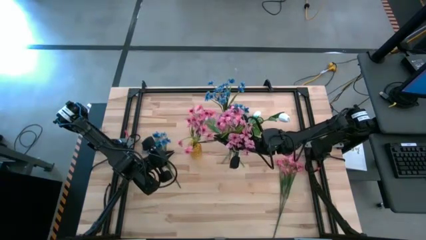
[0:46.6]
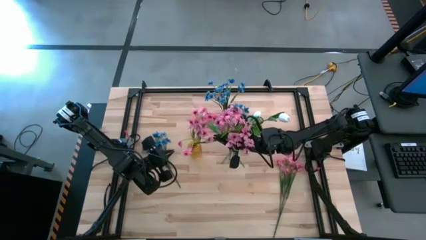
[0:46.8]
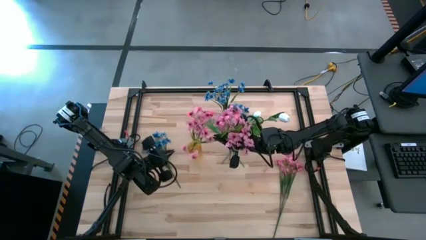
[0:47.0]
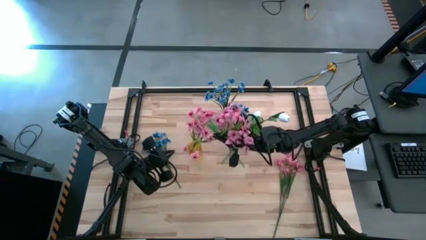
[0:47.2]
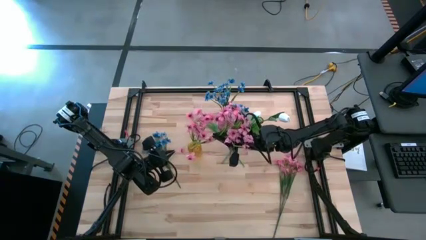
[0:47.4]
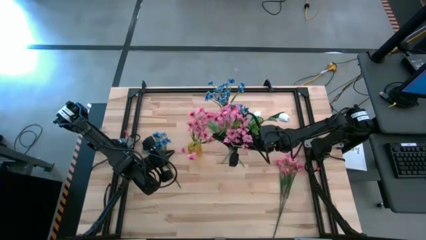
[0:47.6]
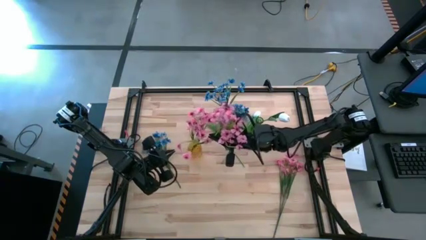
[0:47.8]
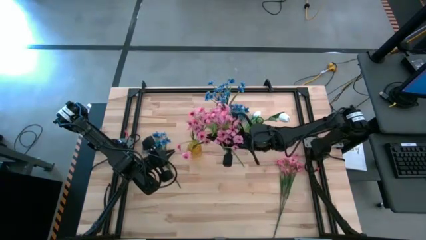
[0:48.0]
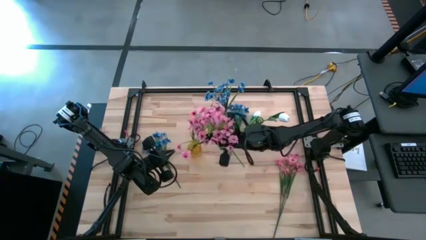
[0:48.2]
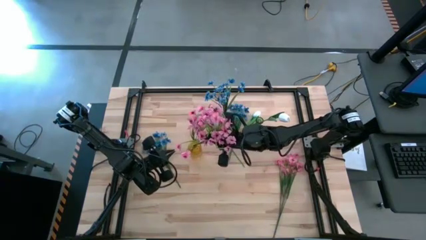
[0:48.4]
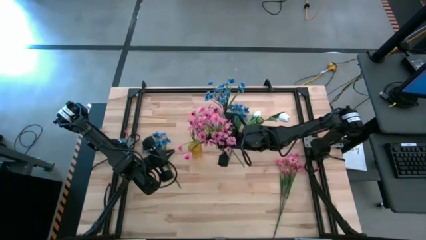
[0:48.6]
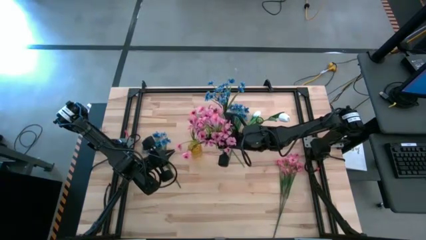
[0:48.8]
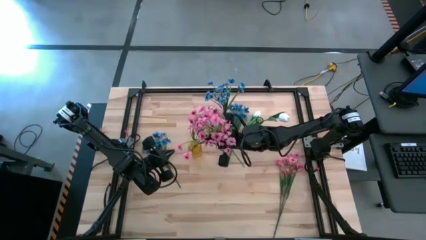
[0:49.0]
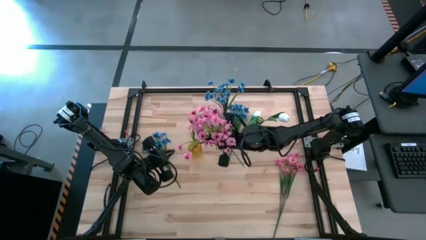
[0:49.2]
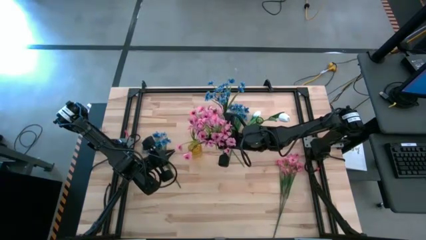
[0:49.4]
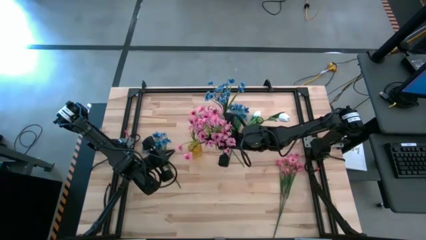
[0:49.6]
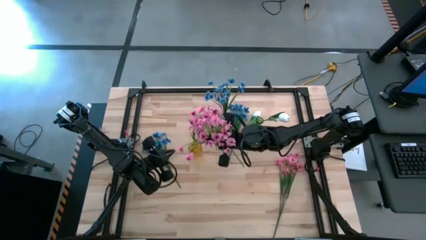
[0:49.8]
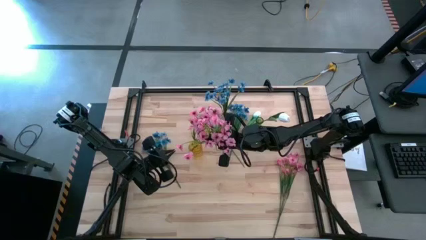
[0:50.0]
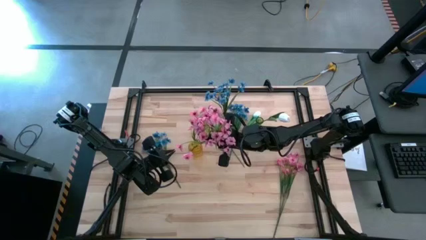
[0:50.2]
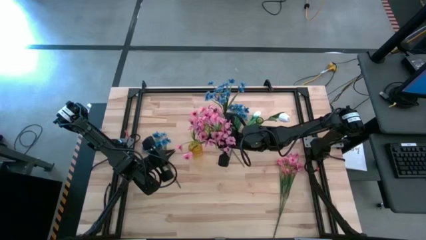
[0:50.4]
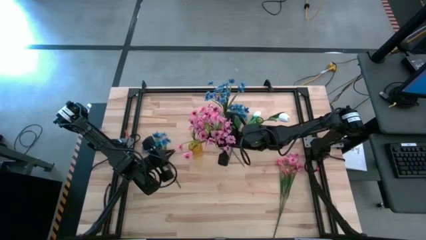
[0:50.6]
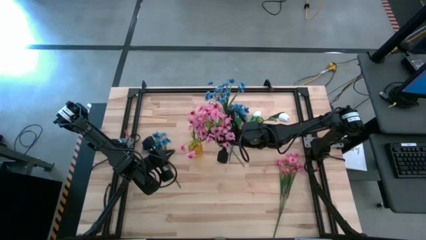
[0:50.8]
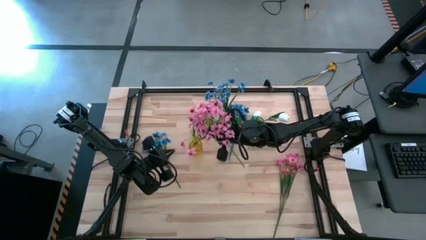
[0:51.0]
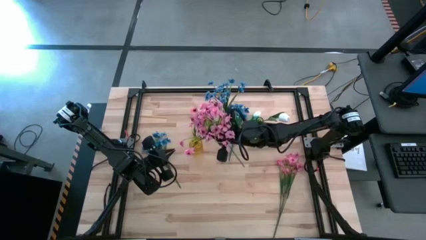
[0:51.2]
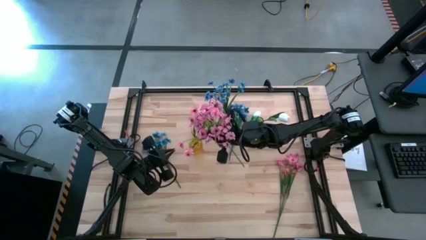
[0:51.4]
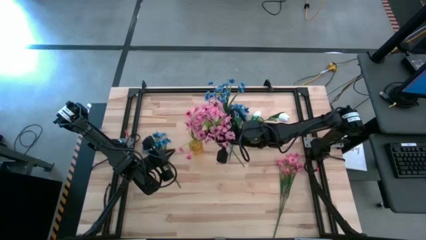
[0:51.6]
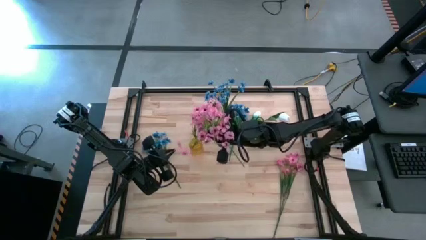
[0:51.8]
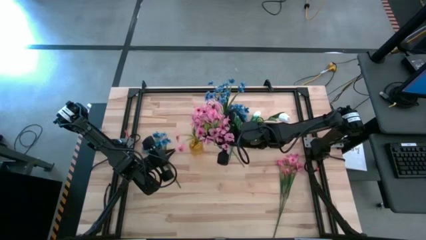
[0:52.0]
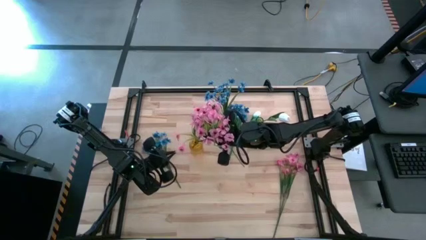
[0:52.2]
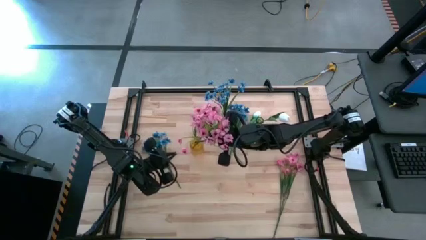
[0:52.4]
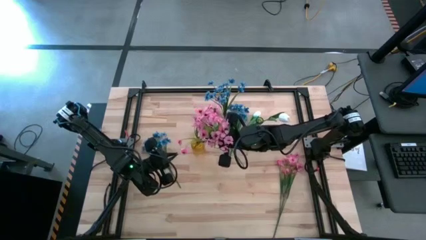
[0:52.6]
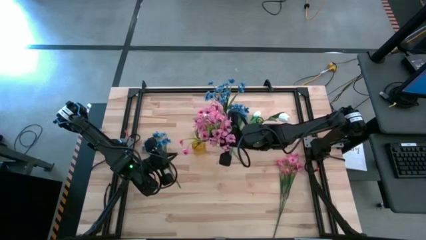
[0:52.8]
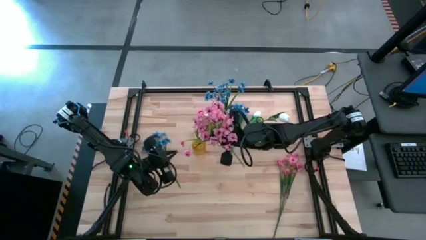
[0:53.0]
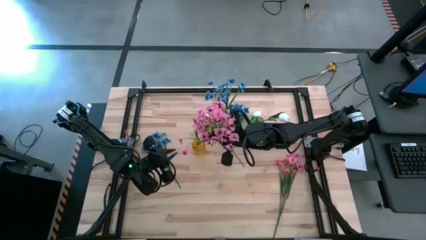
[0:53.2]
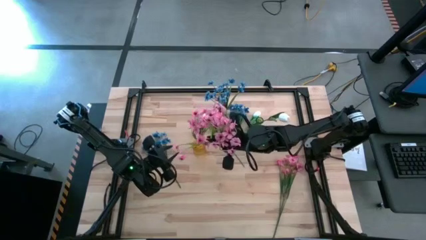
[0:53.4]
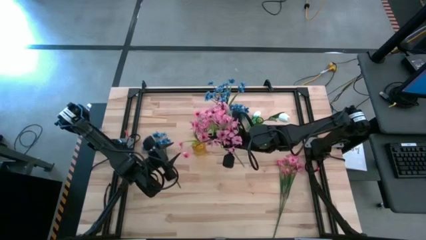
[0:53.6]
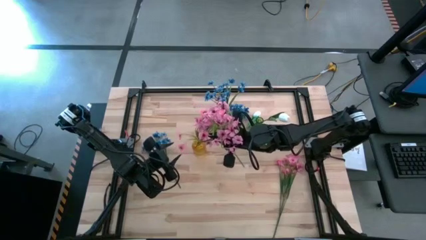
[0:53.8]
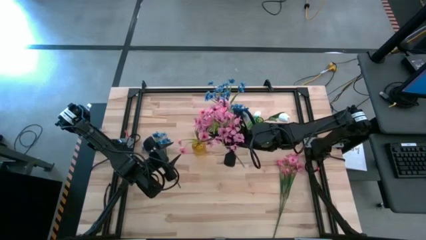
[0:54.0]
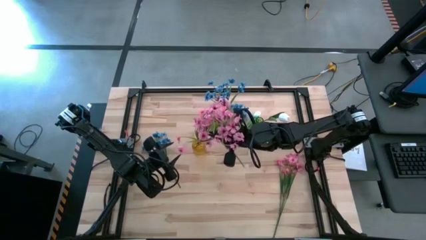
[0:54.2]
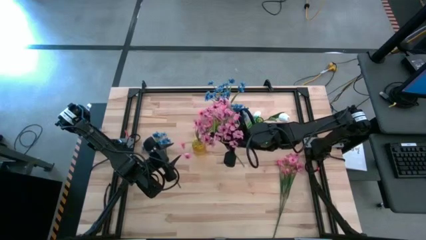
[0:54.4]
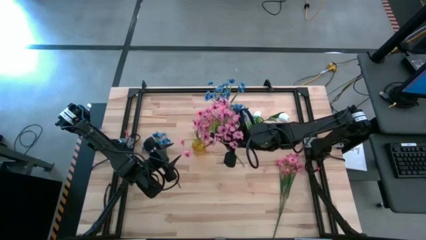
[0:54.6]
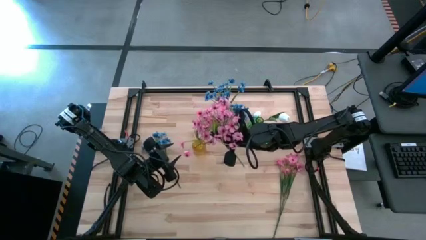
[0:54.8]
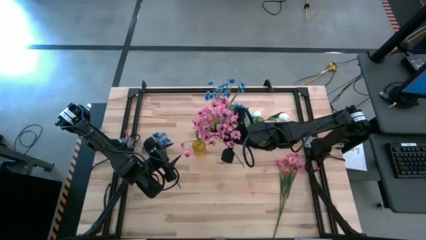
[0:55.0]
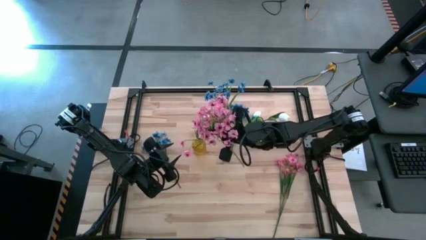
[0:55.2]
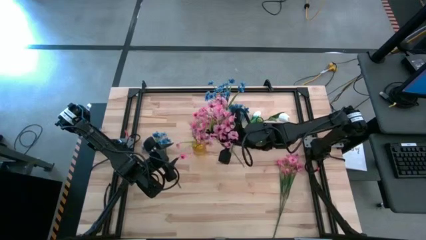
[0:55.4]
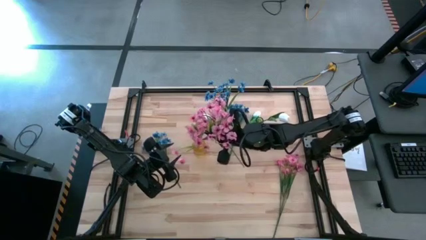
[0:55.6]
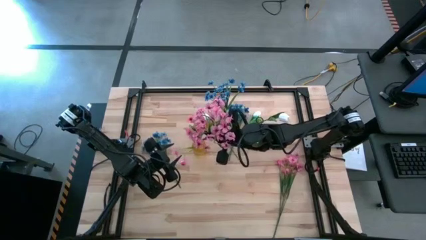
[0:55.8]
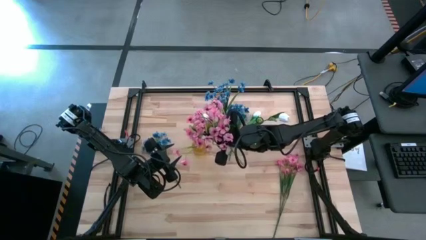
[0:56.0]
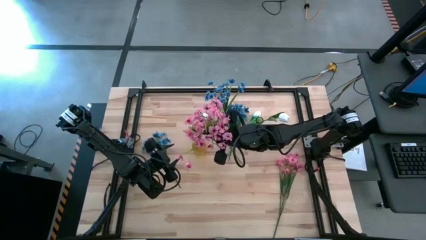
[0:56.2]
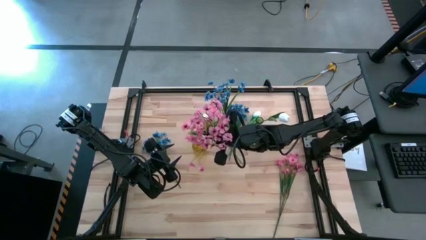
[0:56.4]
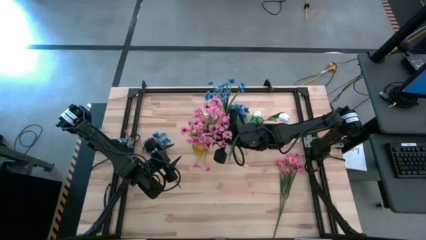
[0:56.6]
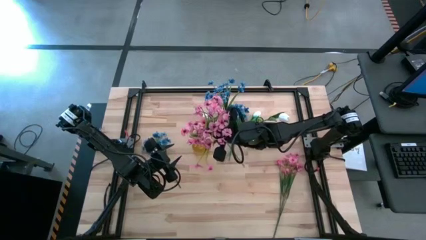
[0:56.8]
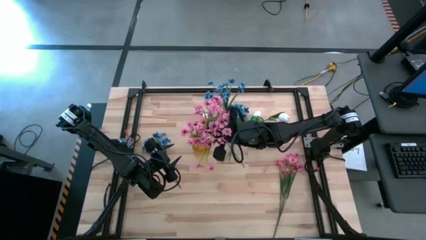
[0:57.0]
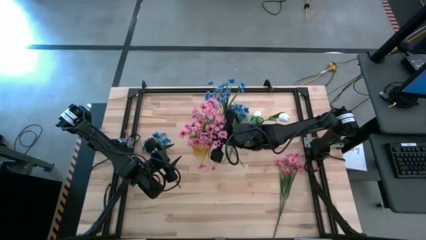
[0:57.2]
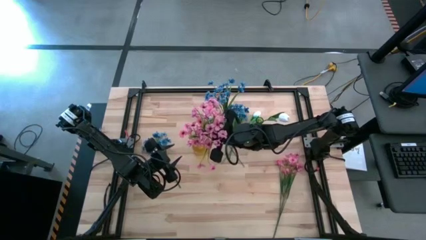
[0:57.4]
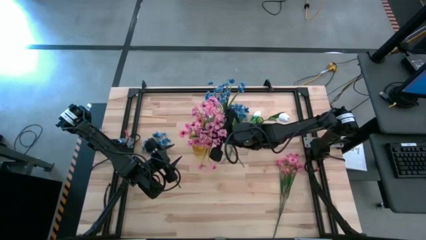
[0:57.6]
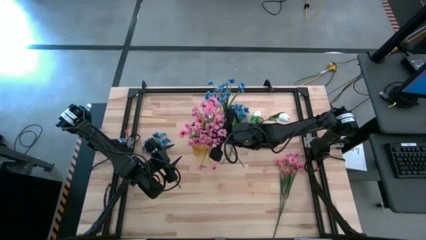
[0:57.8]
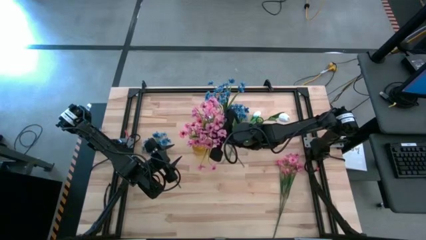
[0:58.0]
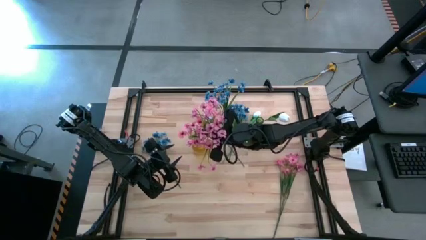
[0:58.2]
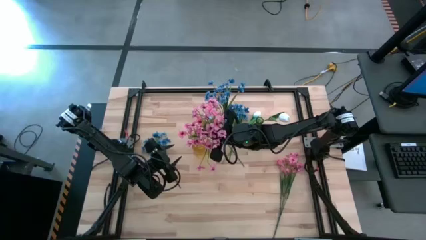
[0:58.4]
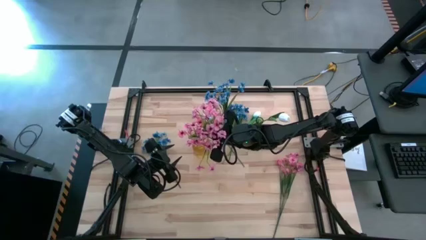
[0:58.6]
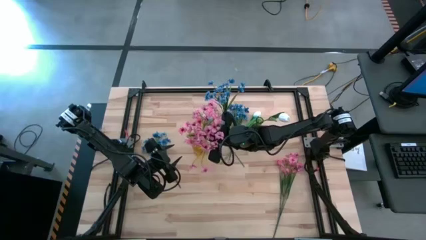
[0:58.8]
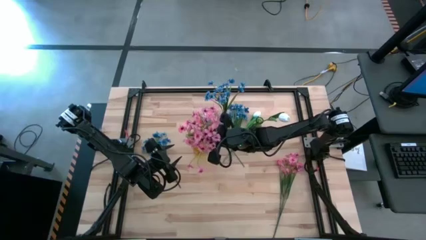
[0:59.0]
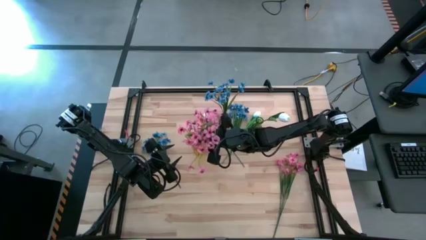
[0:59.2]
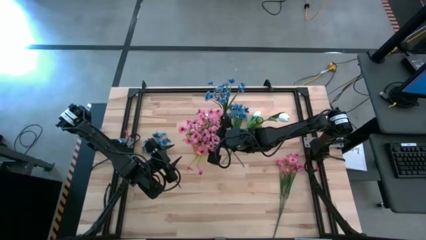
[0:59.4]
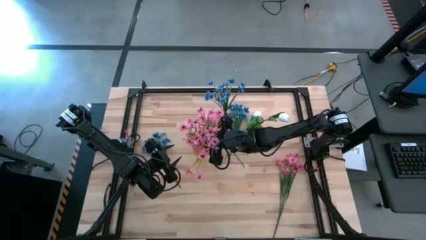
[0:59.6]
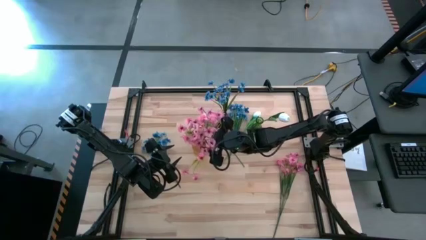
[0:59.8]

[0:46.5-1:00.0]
Task: Sort flowers into vase by color
Put the bottom left pink flower into the yellow flower vase
